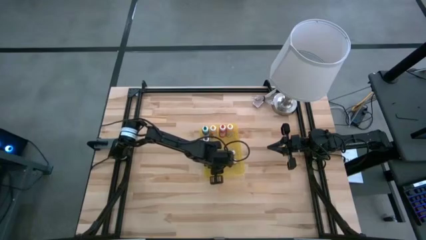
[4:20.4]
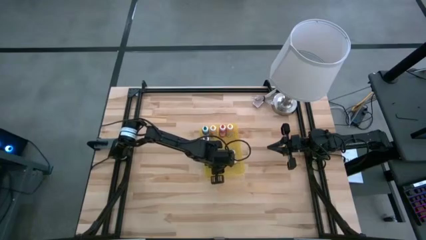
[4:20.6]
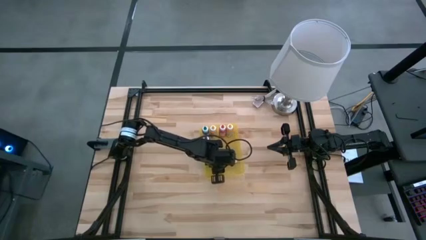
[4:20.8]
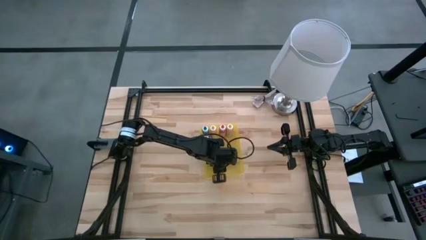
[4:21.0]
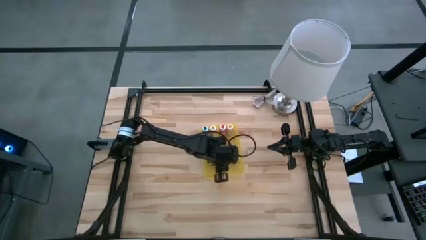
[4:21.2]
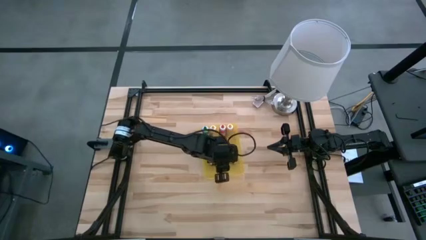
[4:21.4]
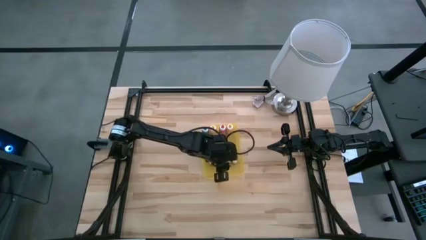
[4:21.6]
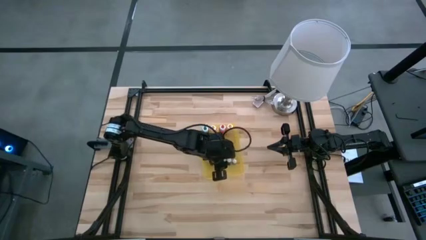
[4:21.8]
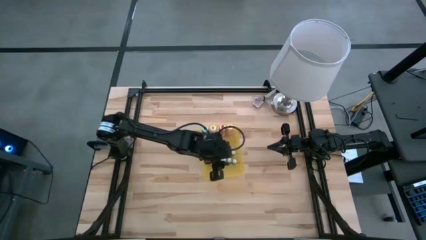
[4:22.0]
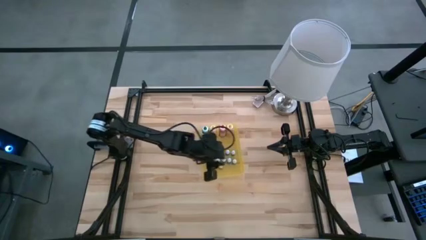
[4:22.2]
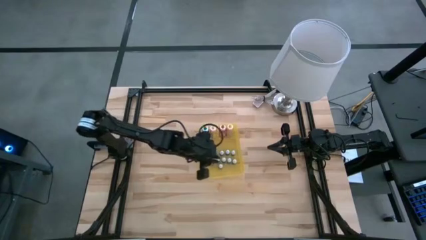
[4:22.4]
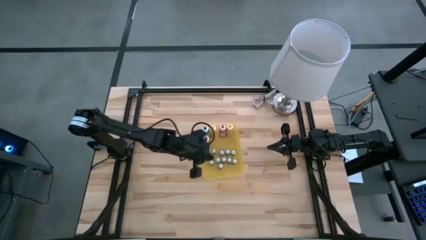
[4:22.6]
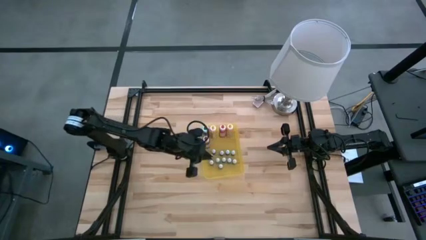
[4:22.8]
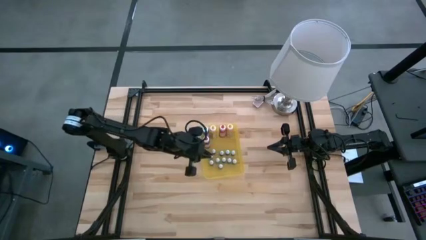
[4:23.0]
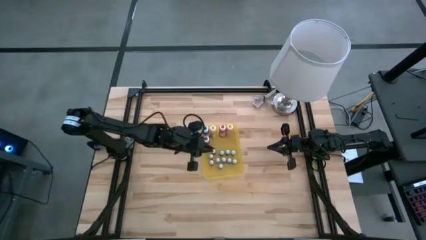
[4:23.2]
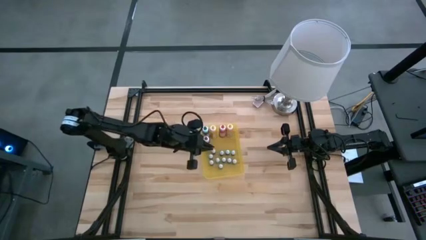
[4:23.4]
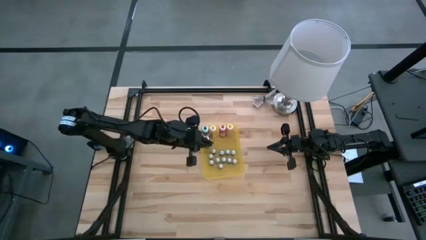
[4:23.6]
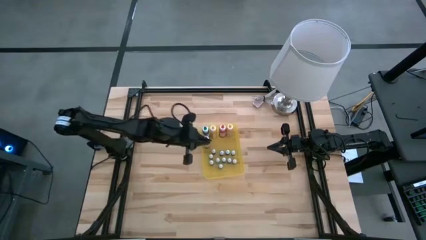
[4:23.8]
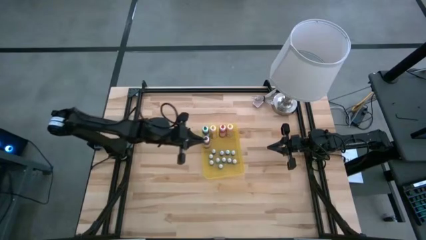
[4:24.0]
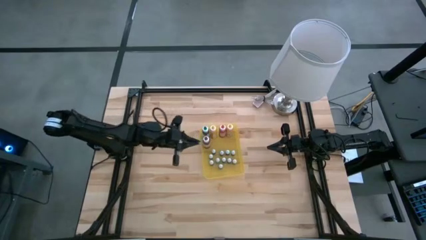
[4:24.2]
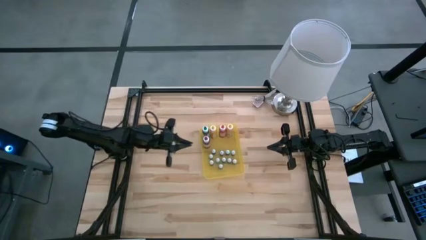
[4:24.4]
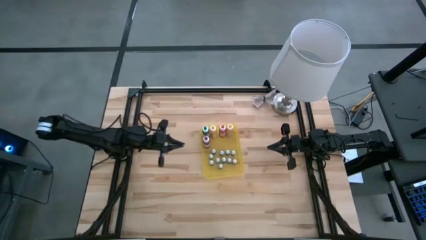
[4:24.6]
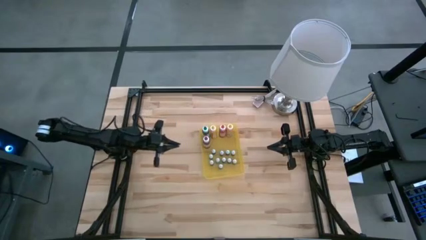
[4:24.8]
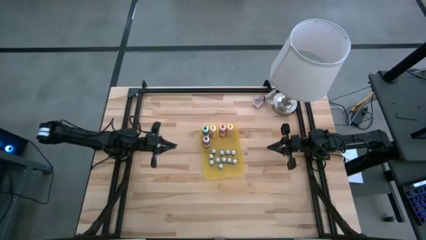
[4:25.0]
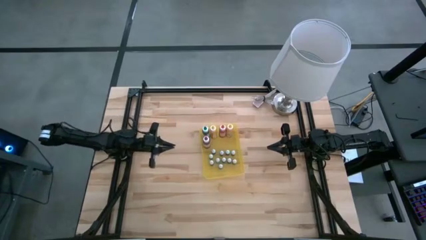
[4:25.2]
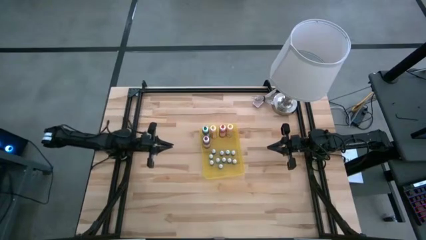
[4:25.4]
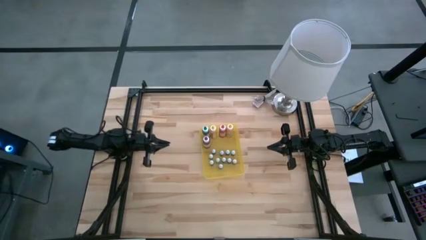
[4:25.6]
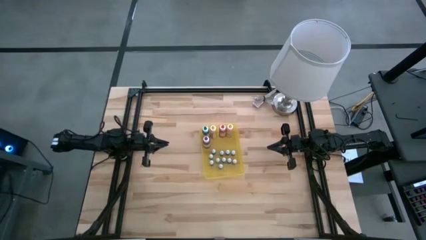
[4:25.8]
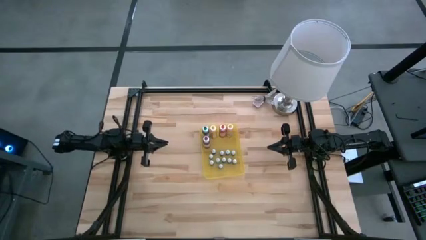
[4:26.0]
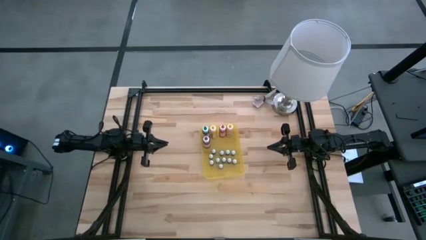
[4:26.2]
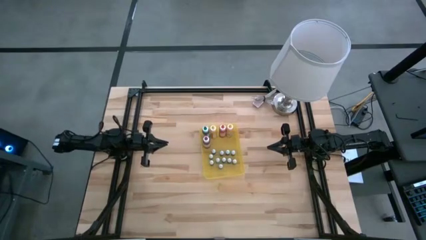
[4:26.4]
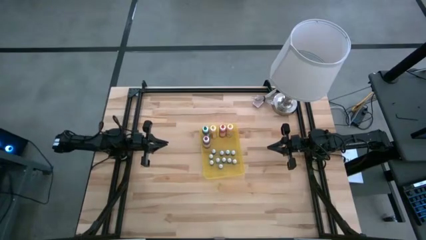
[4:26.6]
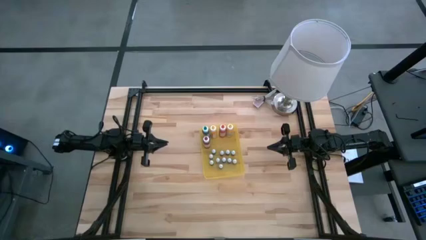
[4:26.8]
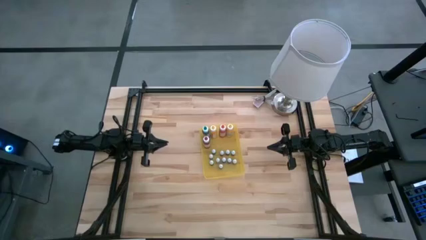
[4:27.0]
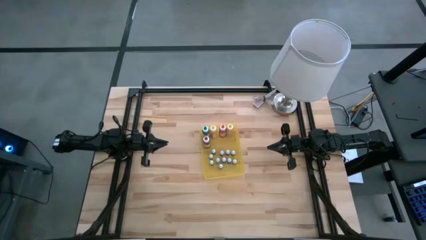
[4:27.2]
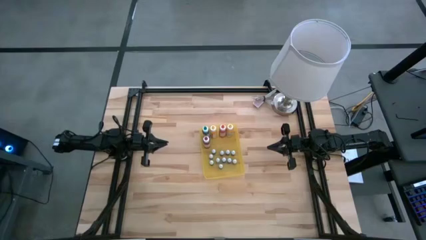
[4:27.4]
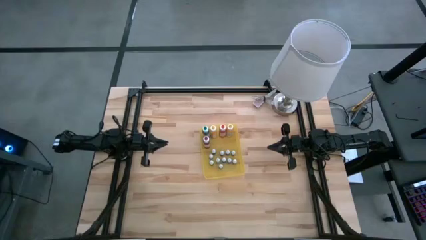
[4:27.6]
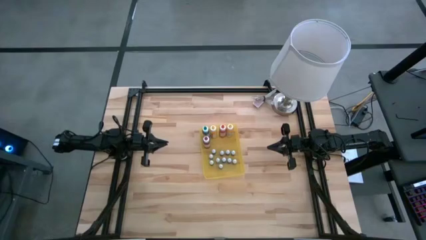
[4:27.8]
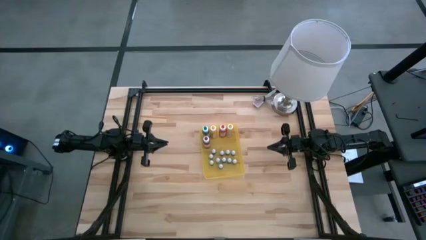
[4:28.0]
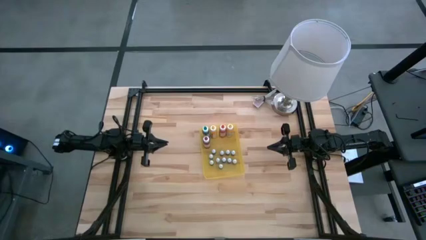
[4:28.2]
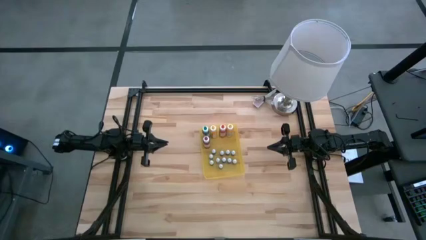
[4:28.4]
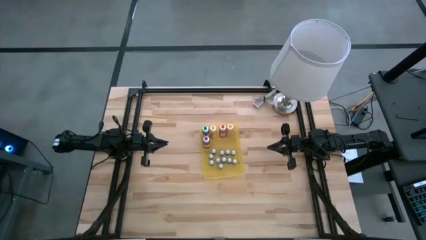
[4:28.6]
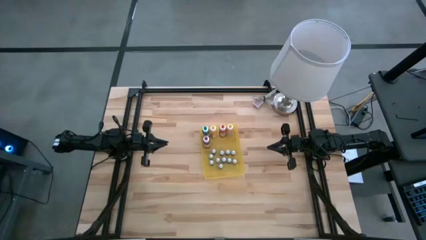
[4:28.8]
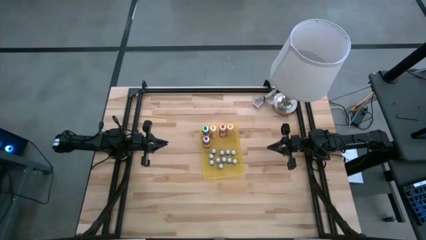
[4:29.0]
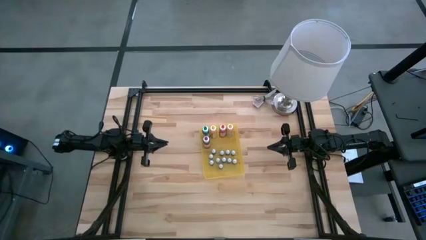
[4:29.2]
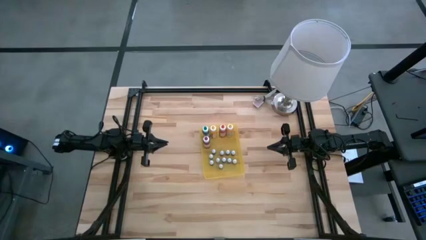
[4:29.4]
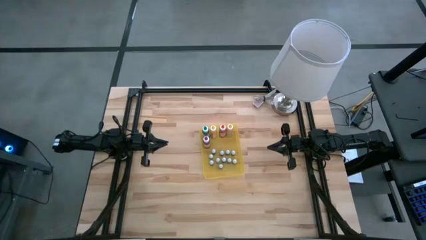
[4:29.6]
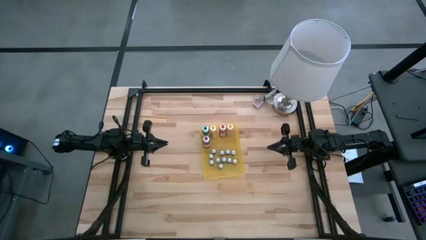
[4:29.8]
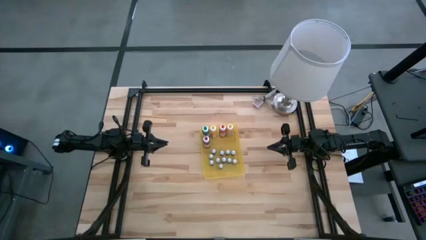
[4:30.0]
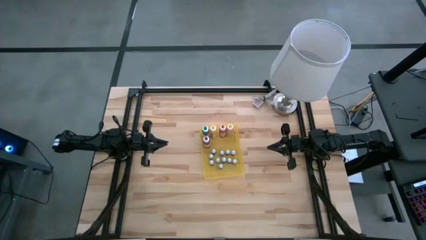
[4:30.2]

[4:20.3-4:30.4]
Task: Pick & Place food coloring
Return to Home Position

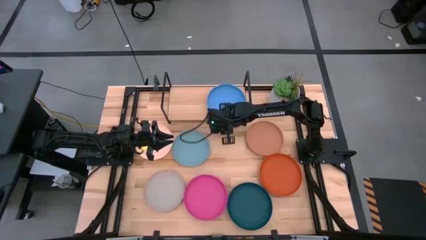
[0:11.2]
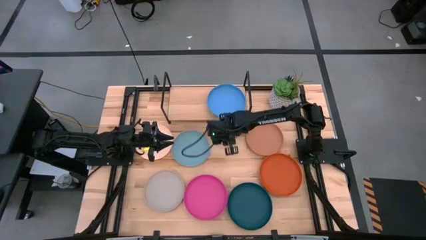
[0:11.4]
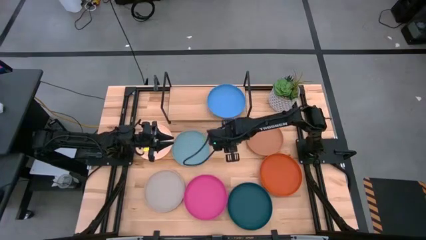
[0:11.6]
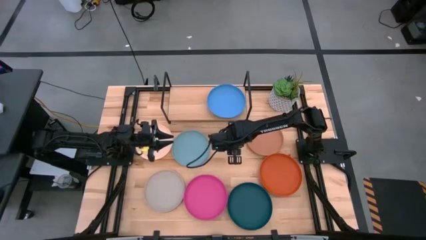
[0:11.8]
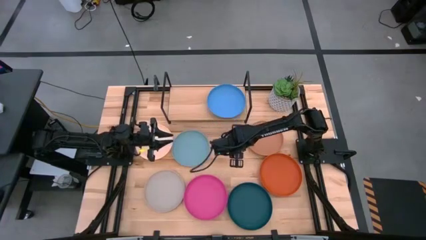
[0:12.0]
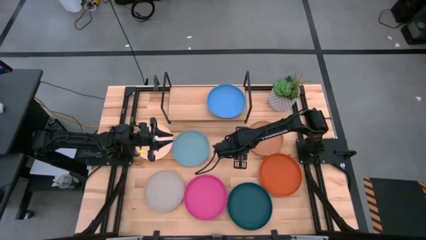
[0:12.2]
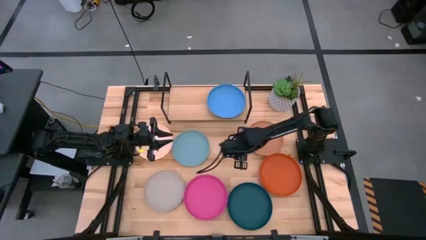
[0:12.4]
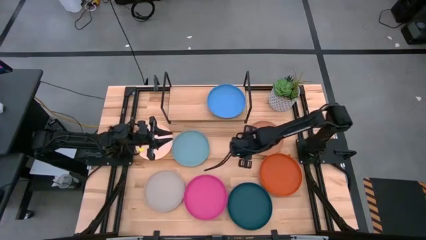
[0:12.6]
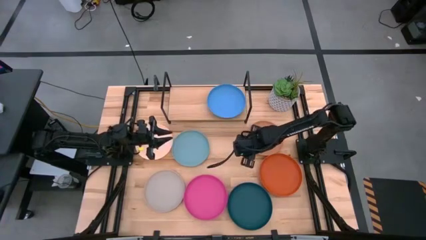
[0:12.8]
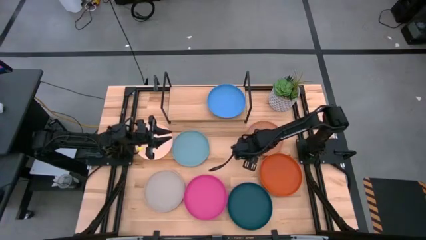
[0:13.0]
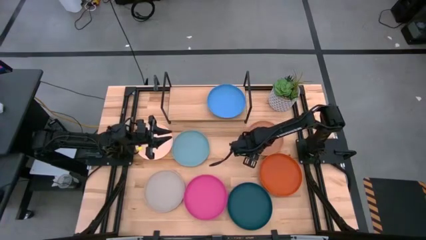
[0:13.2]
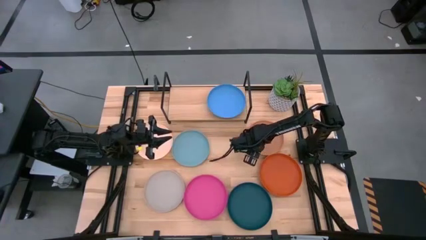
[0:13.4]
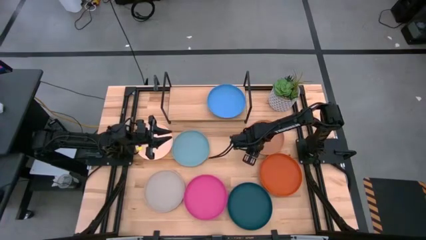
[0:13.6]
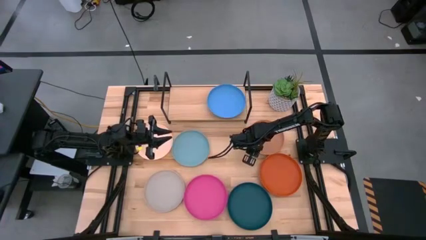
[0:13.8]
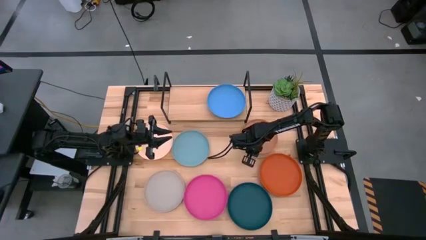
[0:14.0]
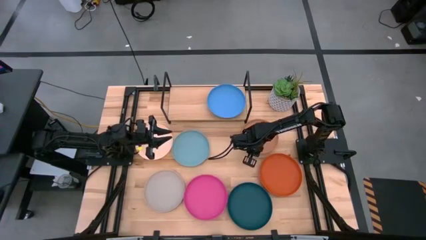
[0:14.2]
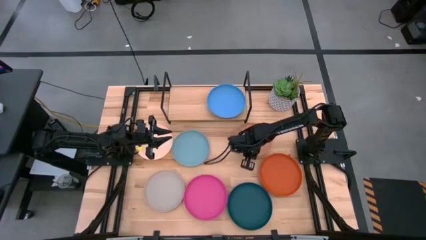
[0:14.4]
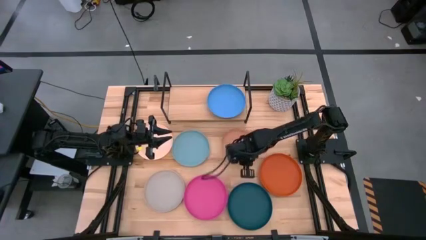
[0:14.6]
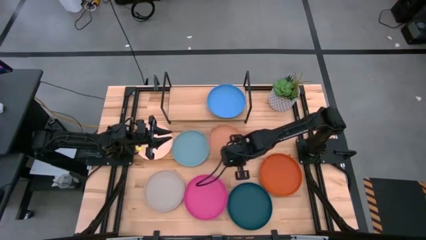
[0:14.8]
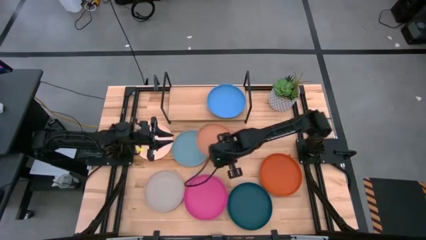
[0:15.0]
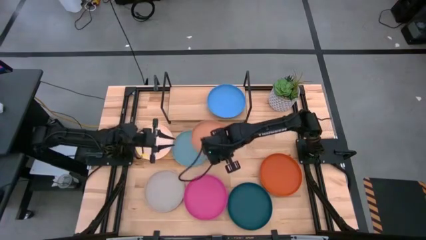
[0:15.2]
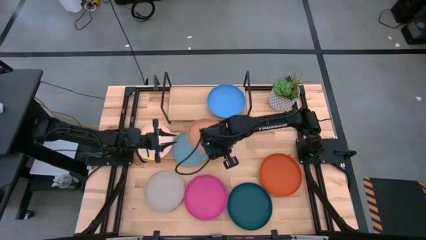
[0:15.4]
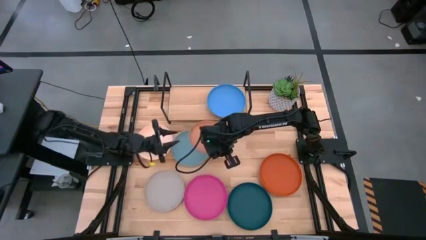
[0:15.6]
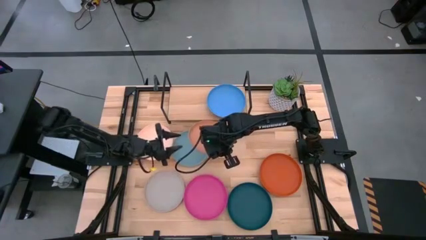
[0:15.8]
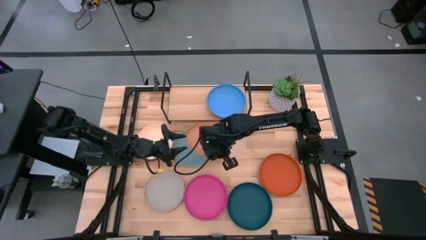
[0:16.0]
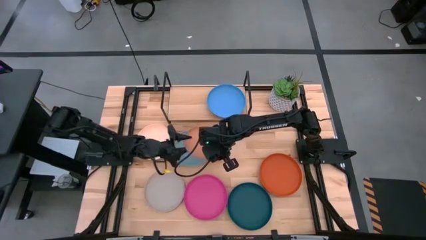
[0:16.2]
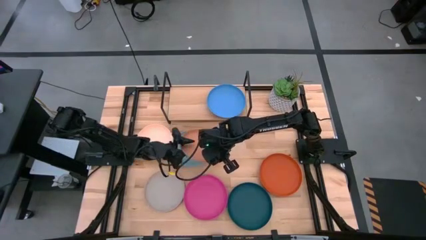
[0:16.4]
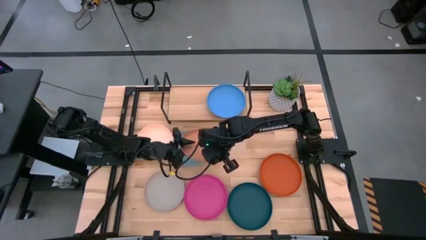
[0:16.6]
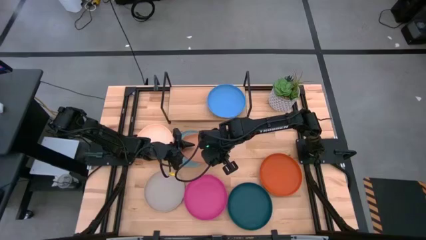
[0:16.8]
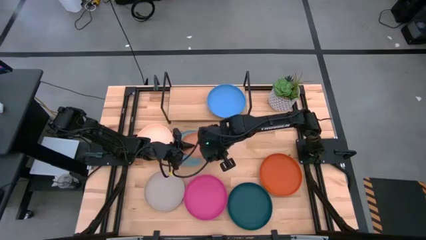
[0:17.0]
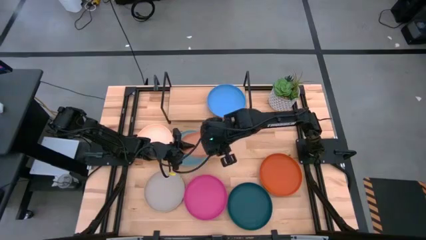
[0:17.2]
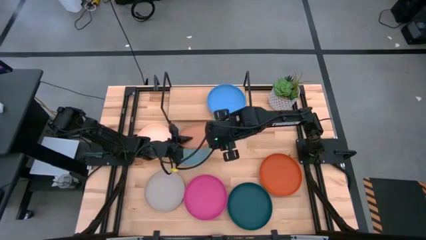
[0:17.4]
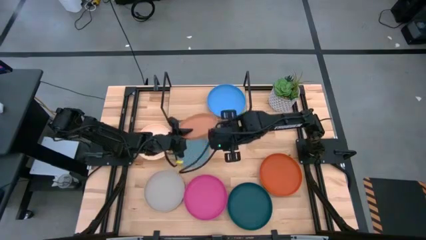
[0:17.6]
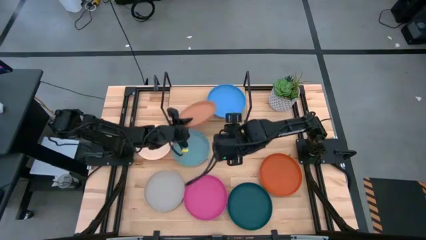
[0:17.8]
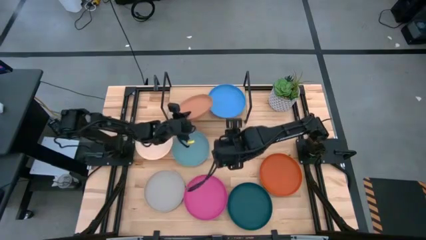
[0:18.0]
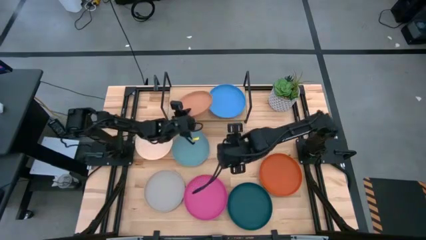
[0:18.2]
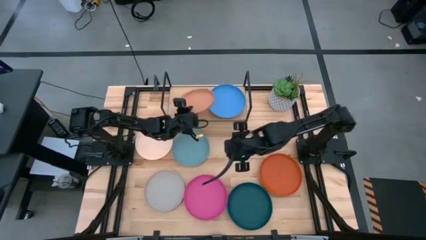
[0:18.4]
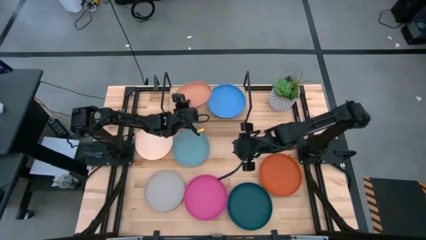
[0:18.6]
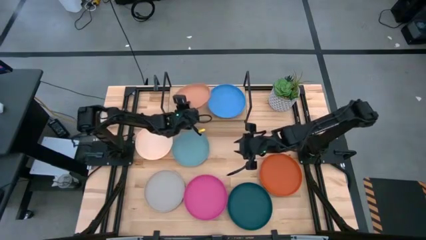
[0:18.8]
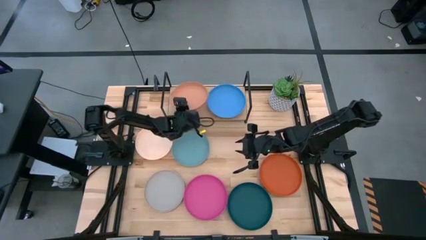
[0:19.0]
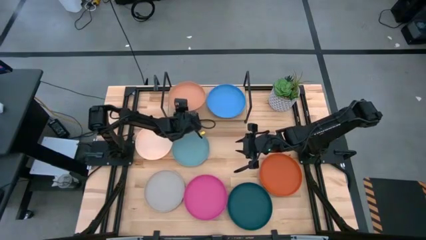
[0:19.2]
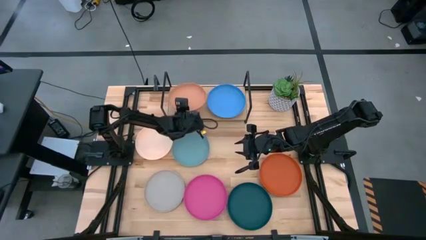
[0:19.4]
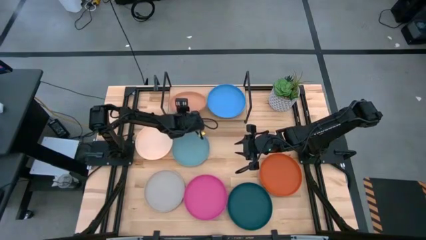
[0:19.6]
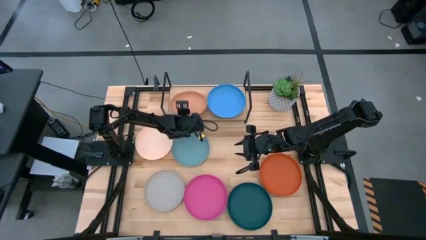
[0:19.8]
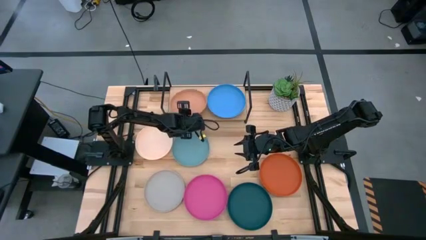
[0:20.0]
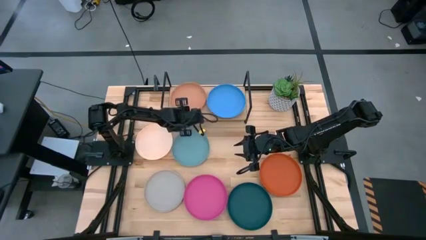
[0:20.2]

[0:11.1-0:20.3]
Task: Place and stack plates onto a shelf
Put the brown plate on the shelf
